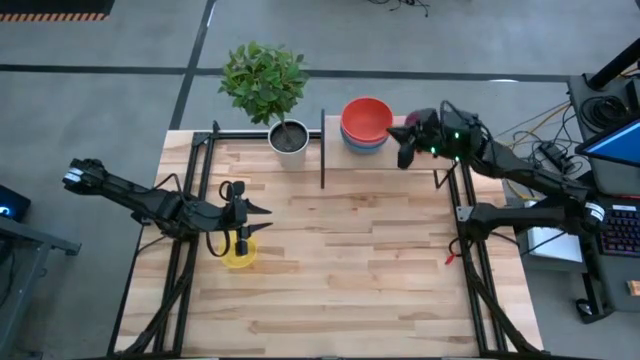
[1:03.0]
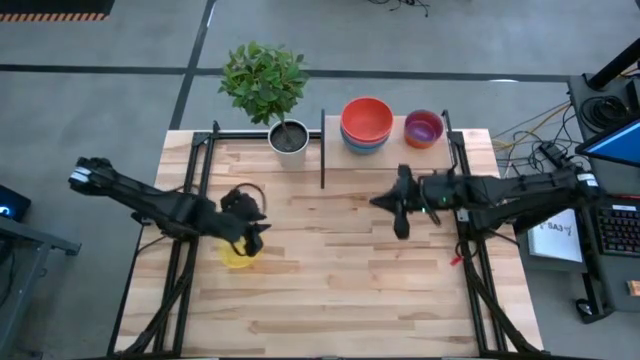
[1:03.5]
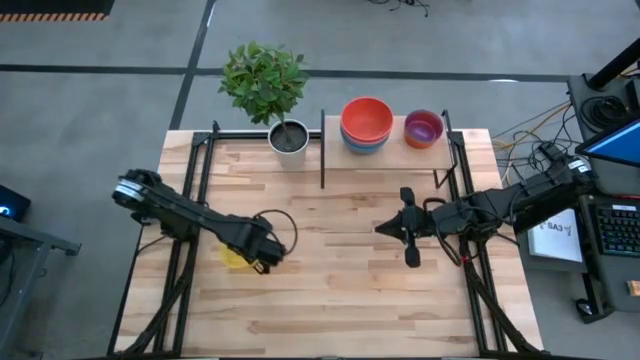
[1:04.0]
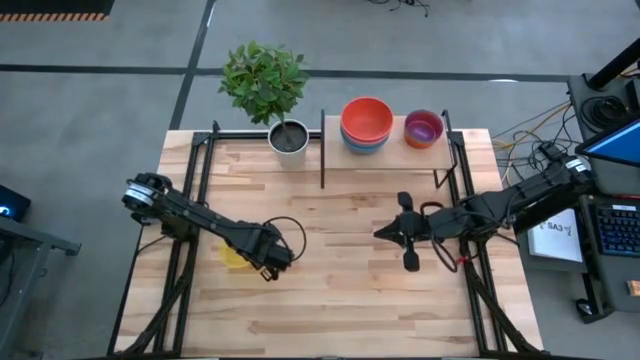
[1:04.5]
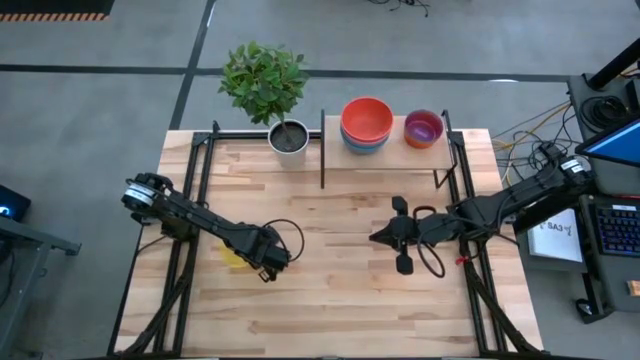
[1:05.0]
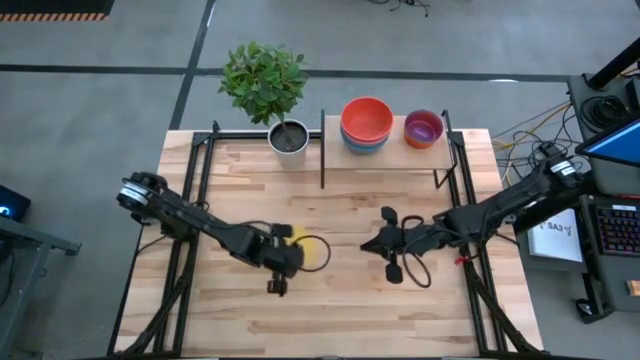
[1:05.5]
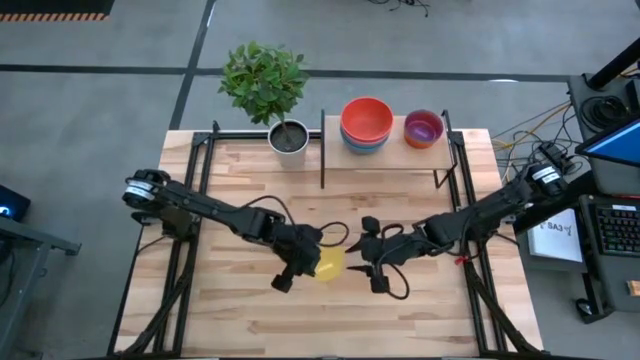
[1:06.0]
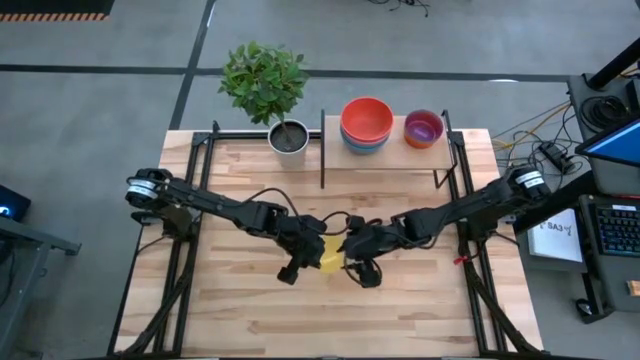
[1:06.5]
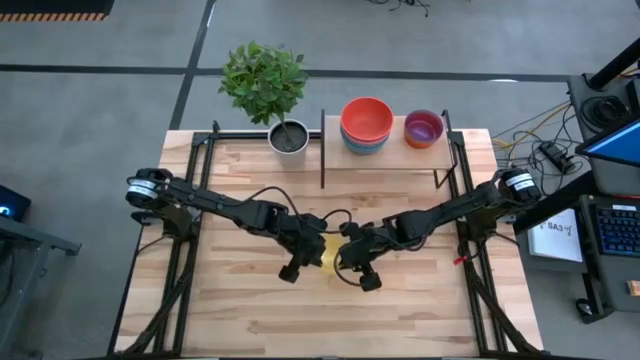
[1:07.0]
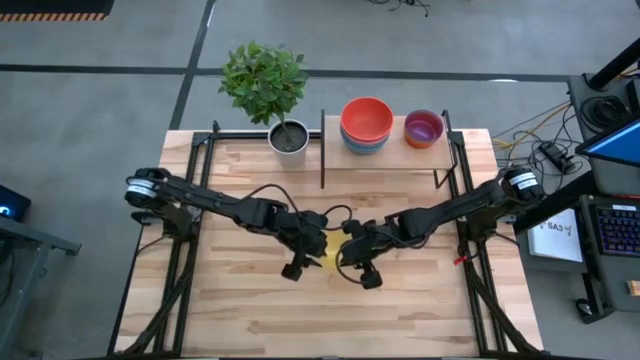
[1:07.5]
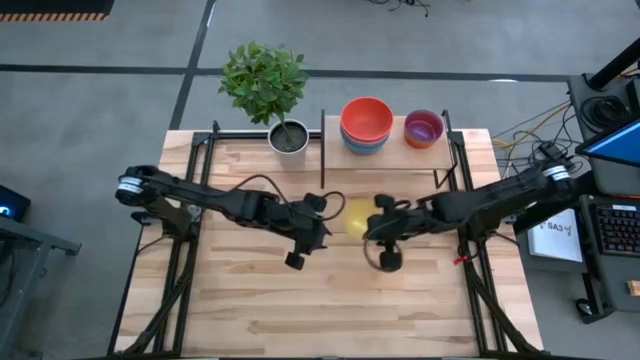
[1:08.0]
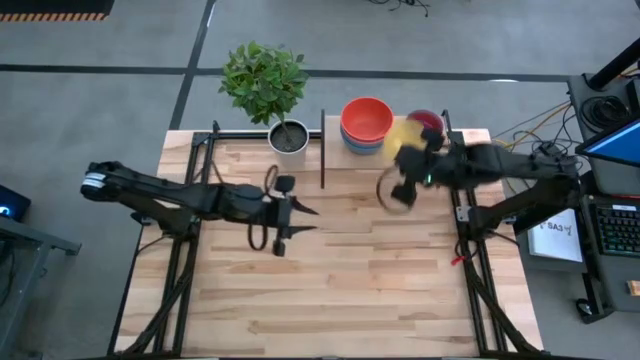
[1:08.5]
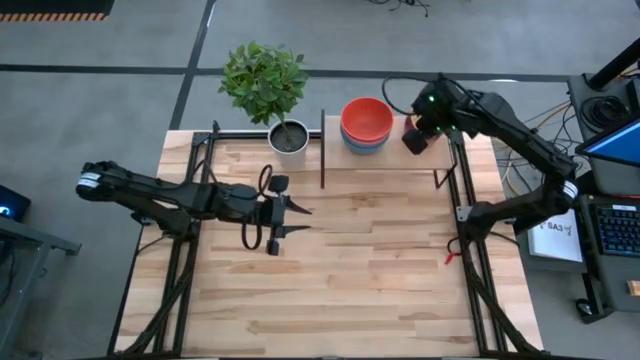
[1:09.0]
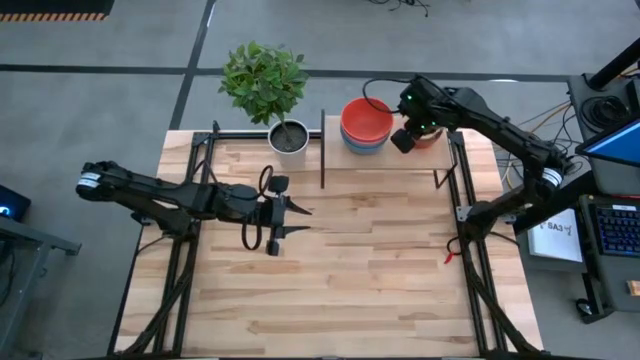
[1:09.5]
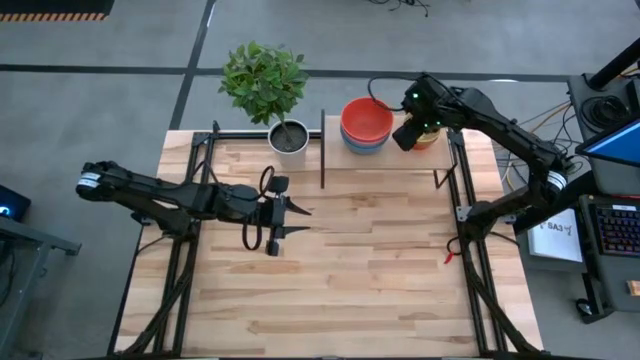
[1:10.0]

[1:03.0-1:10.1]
Task: Place and stack bowls onto a shelf
Stack the yellow bowl on top of the purple bowl on the shelf

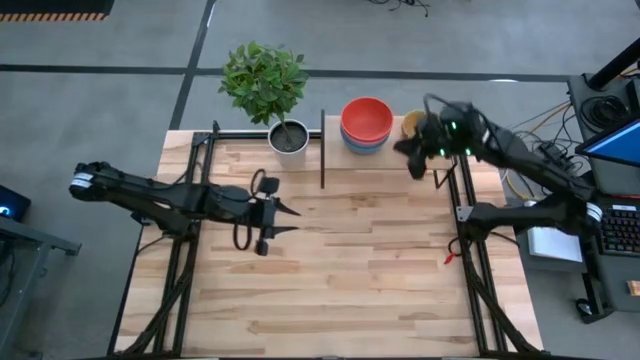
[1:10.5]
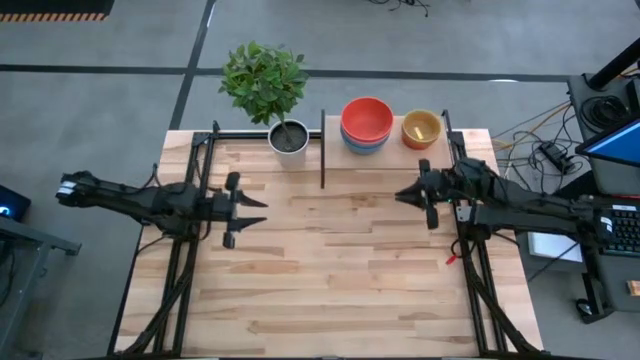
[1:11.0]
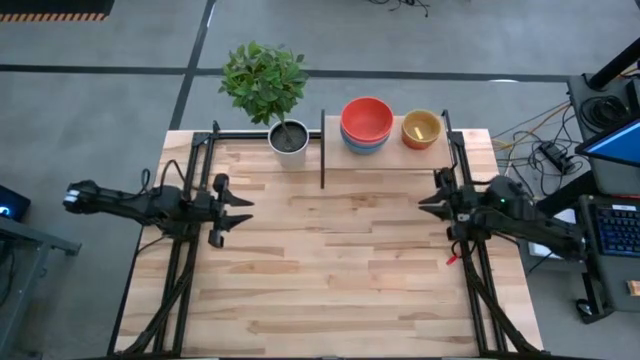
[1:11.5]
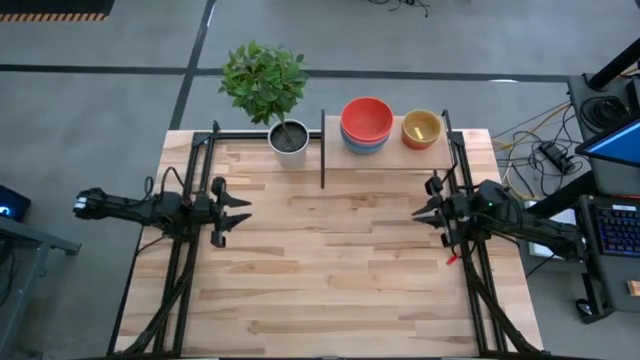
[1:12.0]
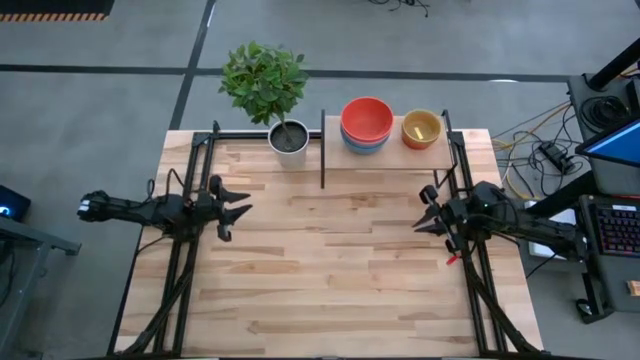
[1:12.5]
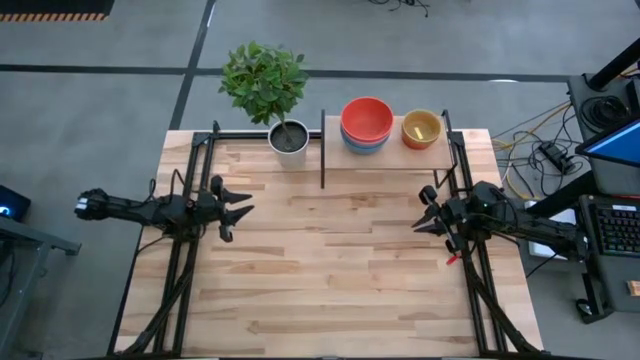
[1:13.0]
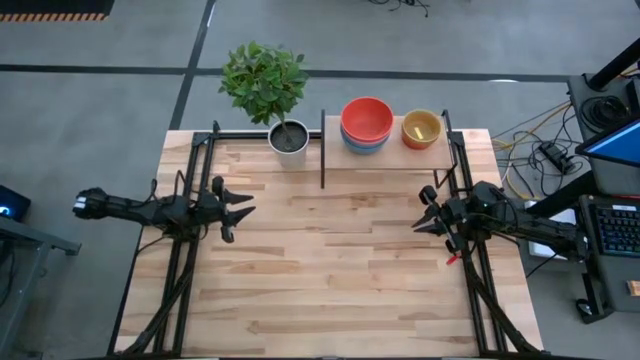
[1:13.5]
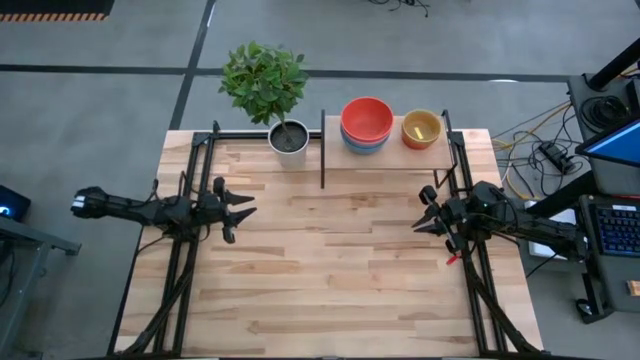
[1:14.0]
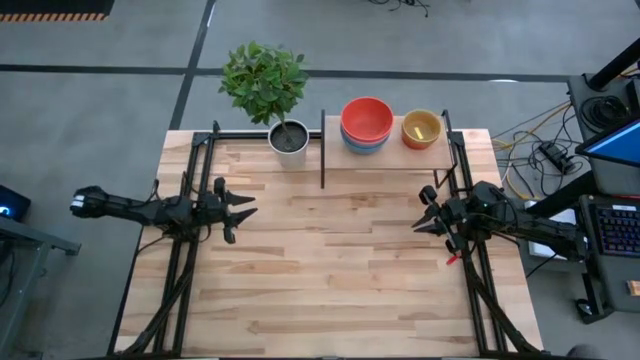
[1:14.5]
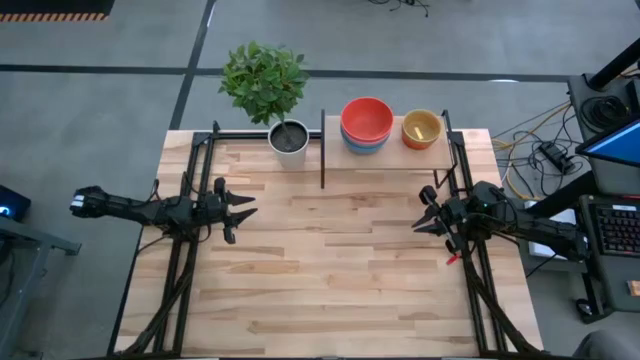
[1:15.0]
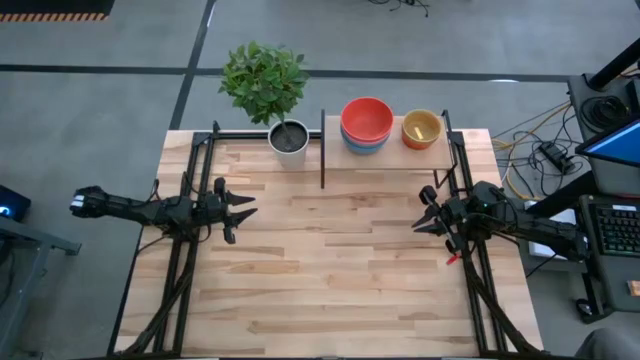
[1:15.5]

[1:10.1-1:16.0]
Return to Home Position

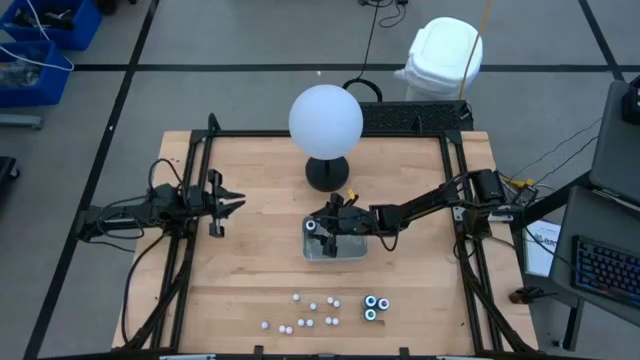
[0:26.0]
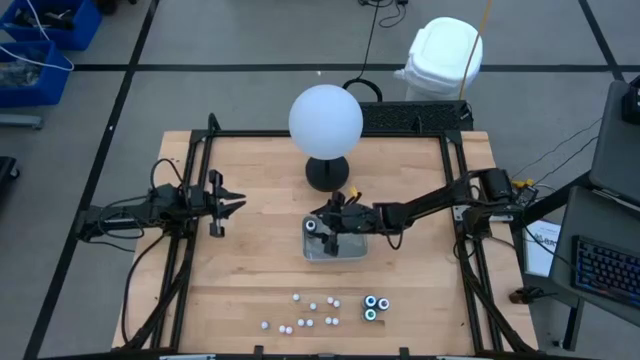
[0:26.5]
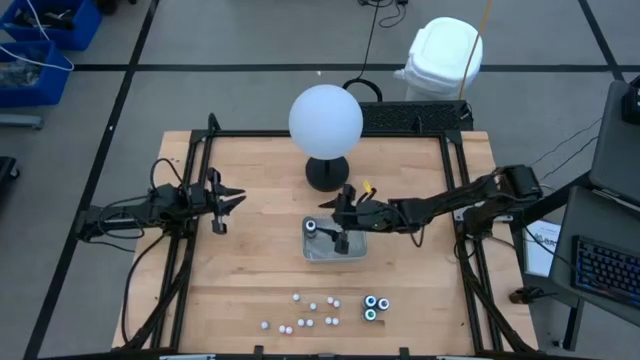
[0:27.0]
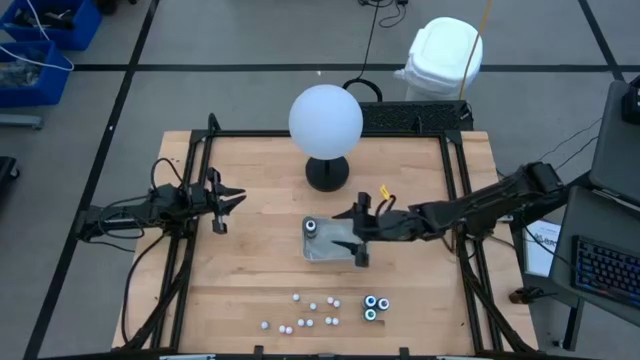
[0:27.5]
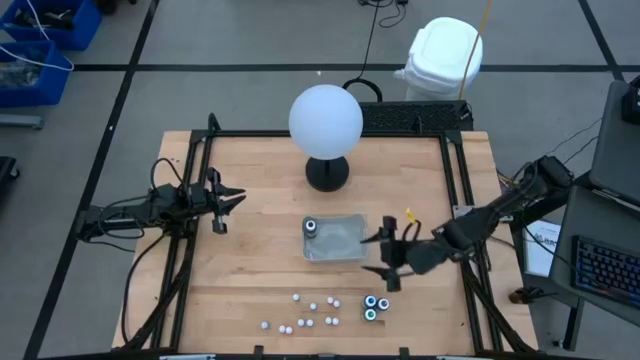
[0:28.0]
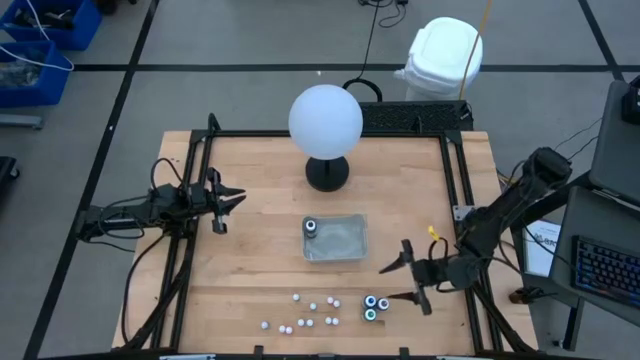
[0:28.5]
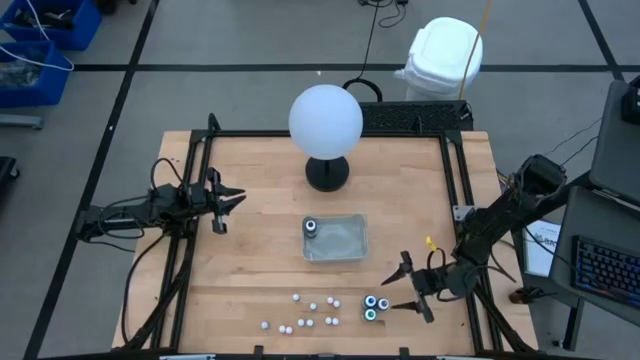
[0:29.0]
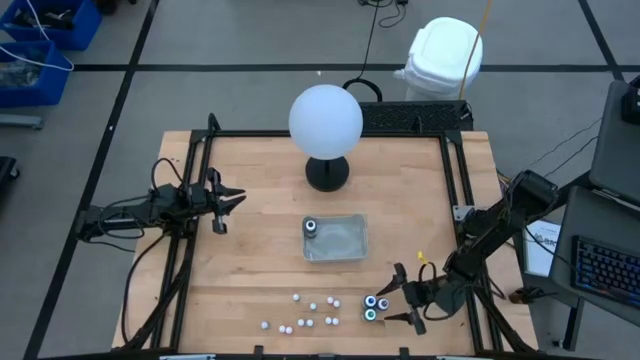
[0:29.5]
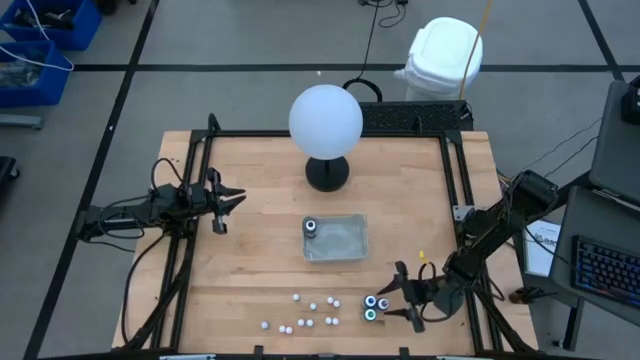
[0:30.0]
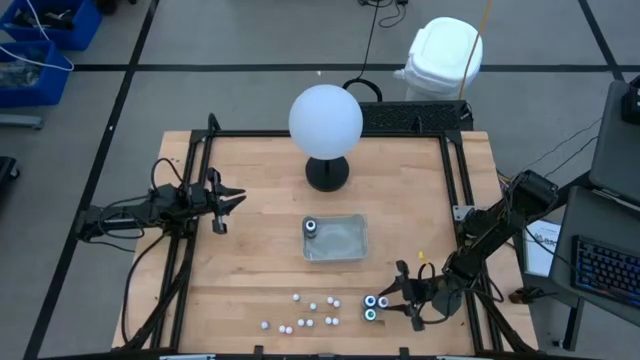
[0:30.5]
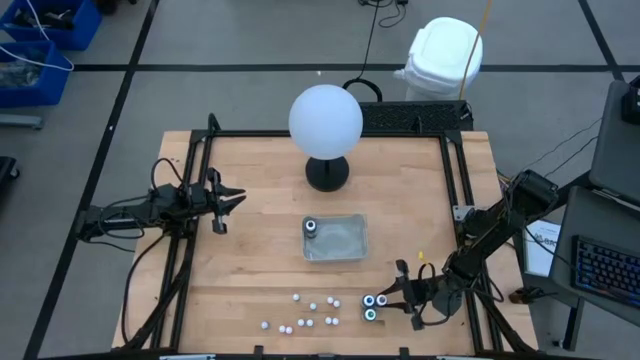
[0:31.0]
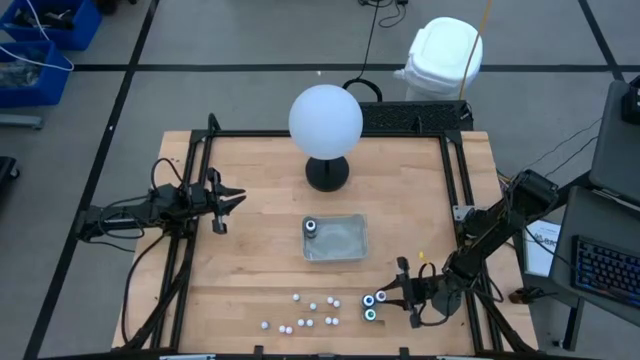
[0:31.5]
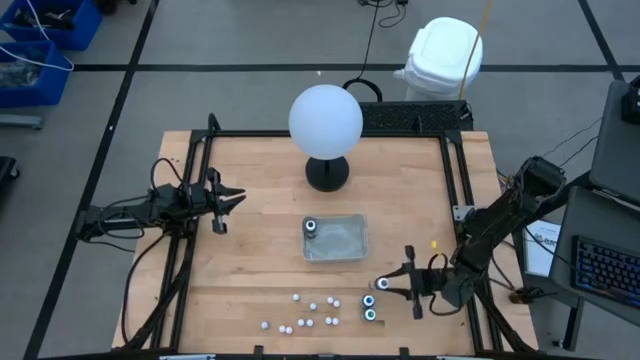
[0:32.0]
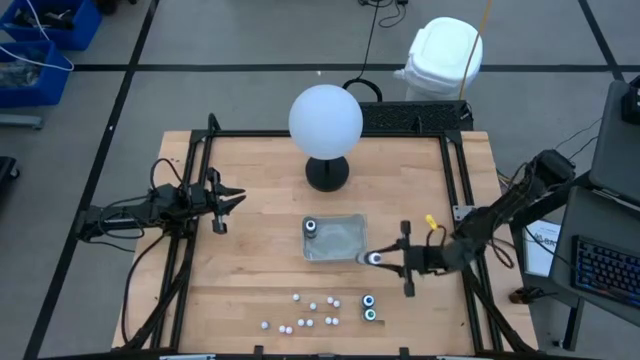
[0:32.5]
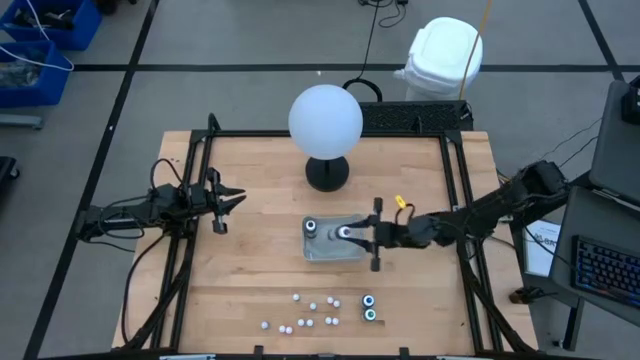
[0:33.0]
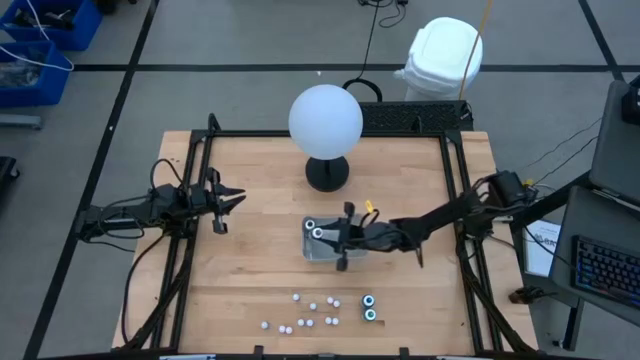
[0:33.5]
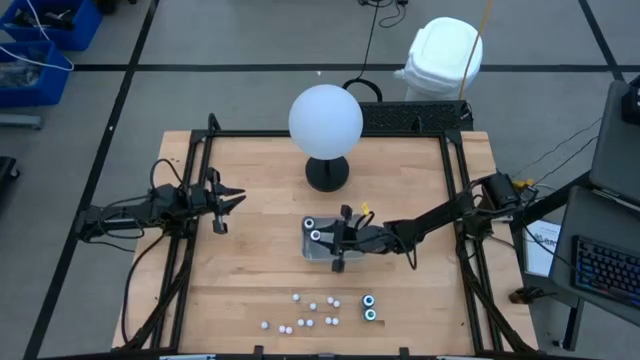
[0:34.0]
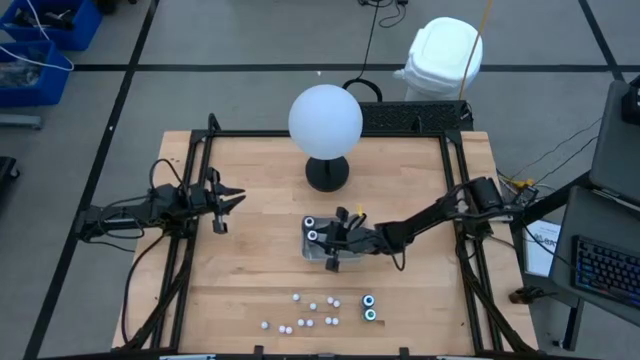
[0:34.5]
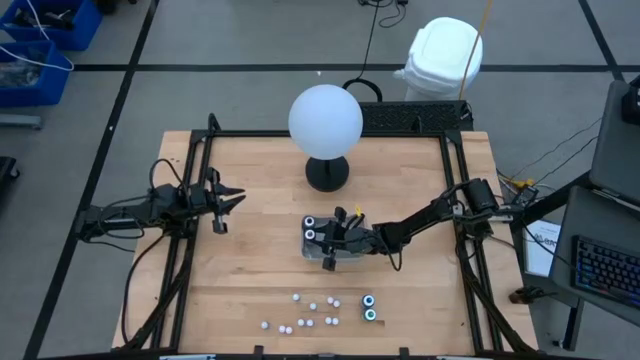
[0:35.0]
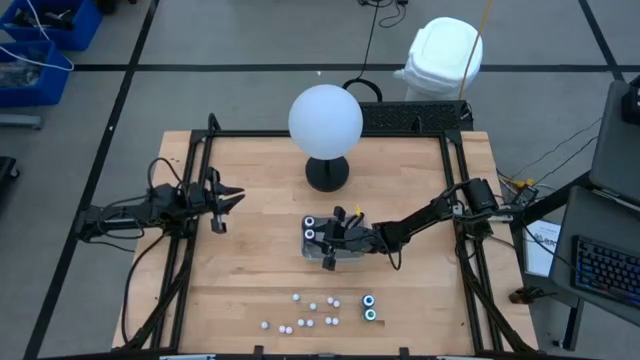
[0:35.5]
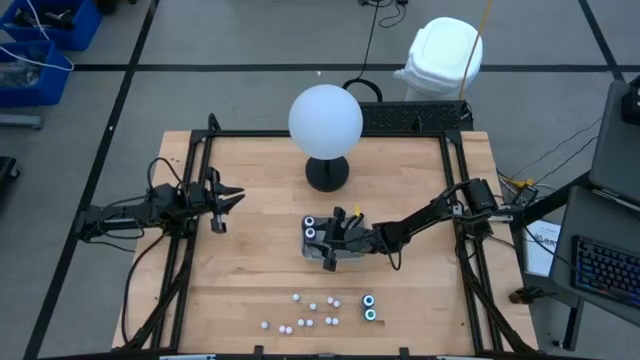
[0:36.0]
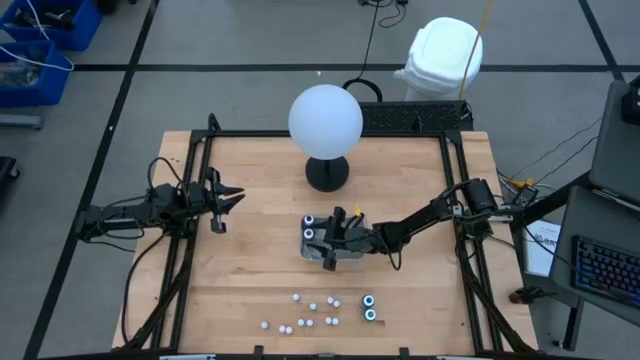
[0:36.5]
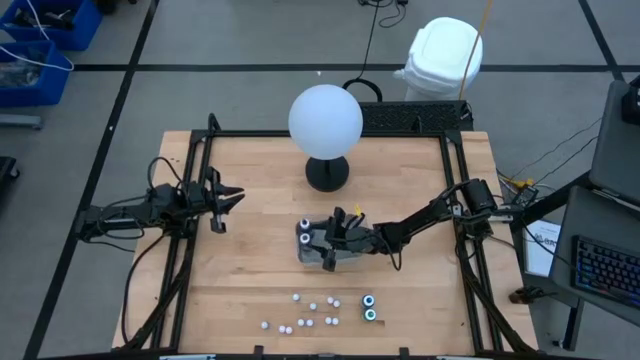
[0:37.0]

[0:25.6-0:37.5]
Task: Pick & Place food coloring
Put the large violet food coloring bottle into the gray bin
